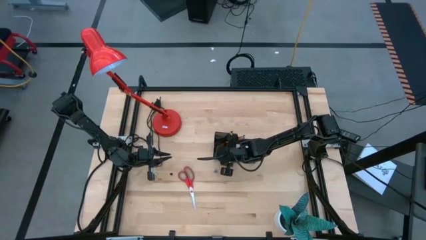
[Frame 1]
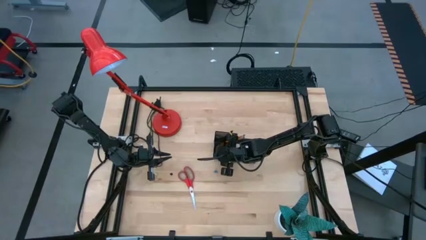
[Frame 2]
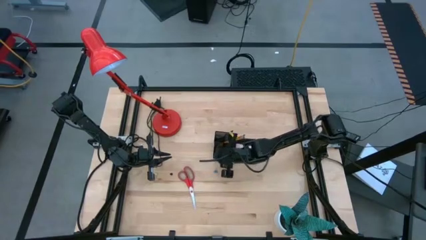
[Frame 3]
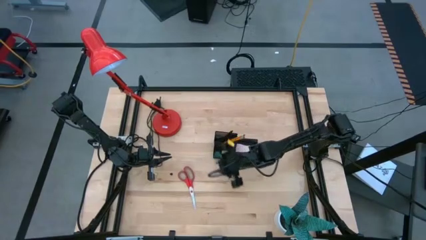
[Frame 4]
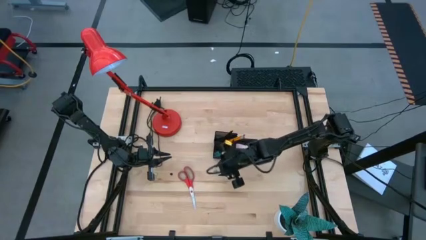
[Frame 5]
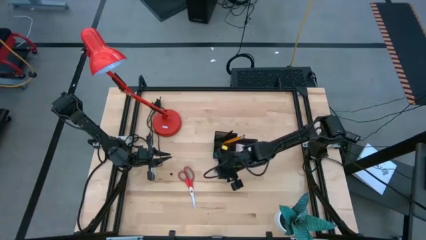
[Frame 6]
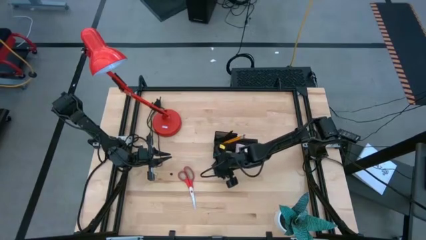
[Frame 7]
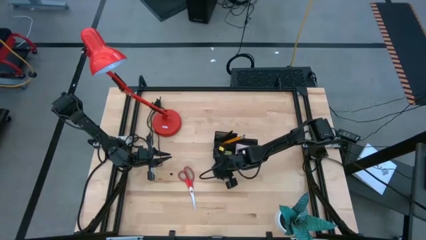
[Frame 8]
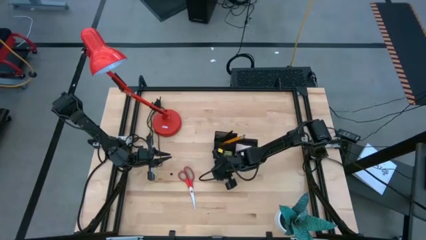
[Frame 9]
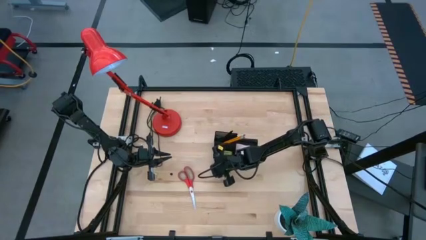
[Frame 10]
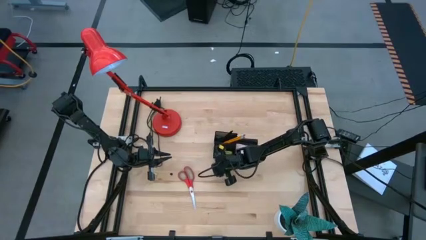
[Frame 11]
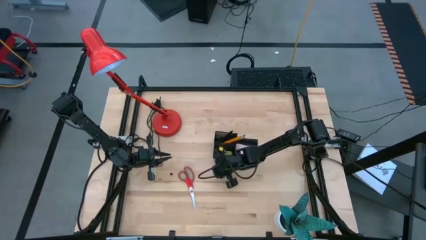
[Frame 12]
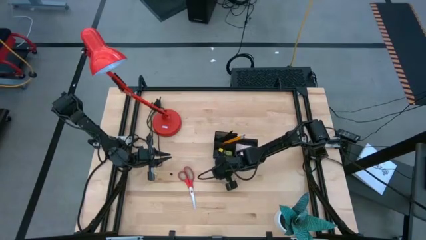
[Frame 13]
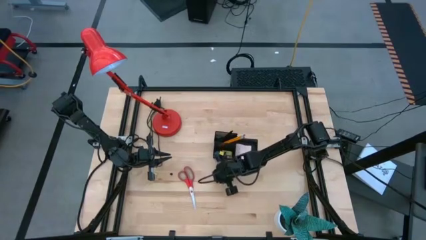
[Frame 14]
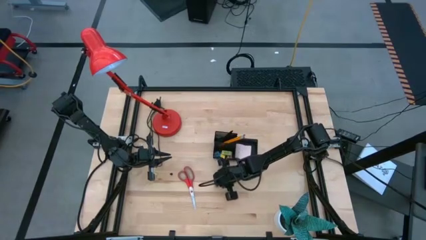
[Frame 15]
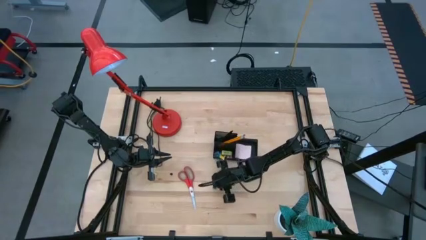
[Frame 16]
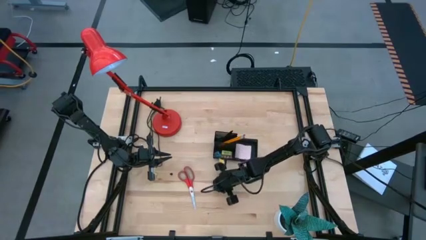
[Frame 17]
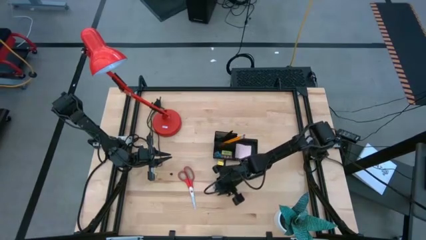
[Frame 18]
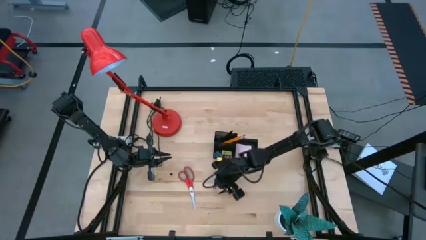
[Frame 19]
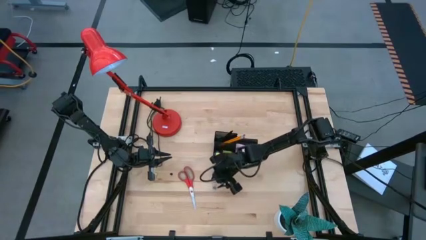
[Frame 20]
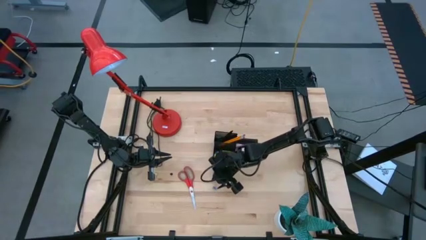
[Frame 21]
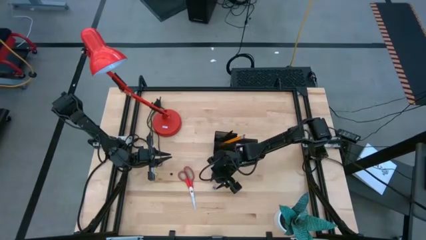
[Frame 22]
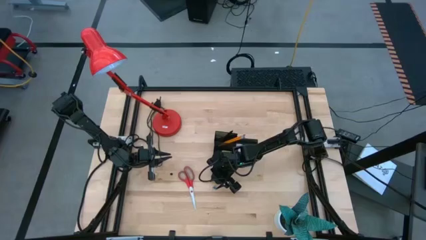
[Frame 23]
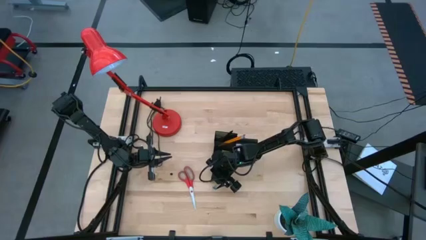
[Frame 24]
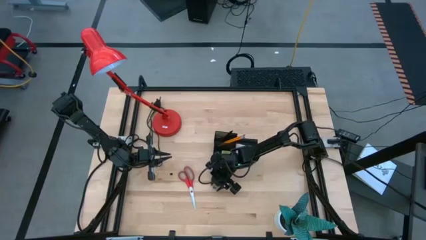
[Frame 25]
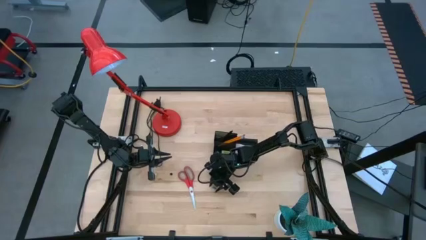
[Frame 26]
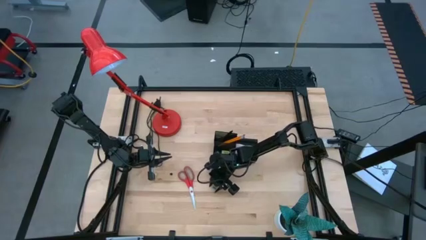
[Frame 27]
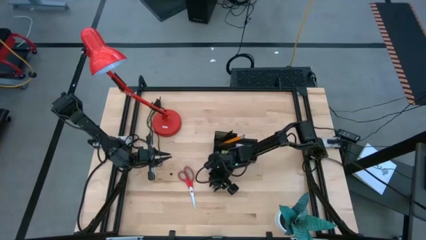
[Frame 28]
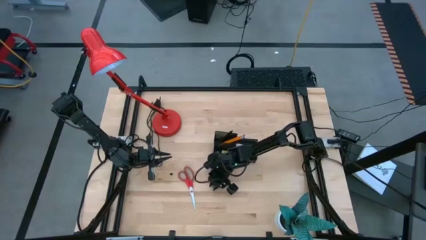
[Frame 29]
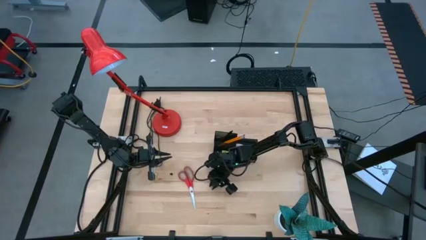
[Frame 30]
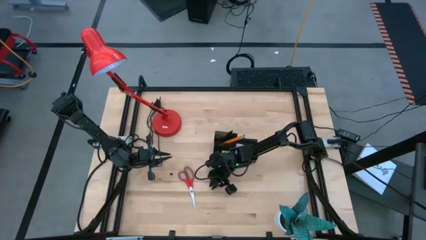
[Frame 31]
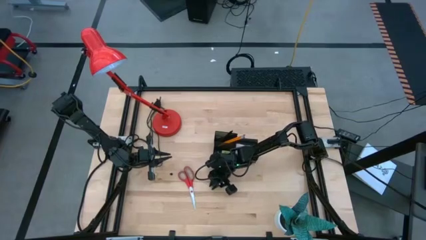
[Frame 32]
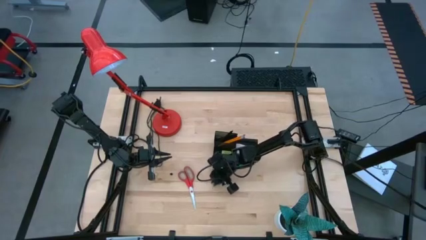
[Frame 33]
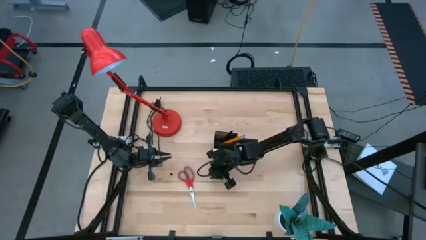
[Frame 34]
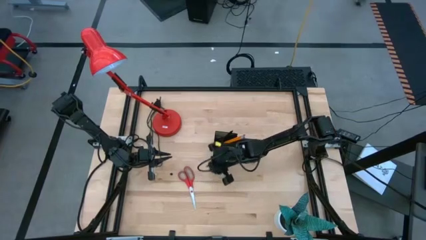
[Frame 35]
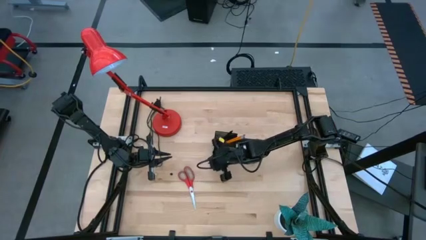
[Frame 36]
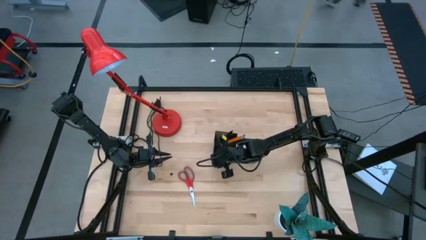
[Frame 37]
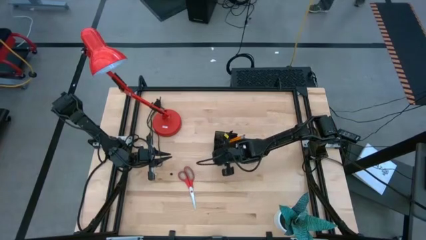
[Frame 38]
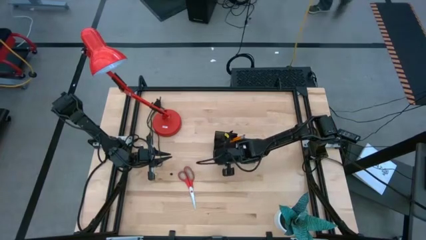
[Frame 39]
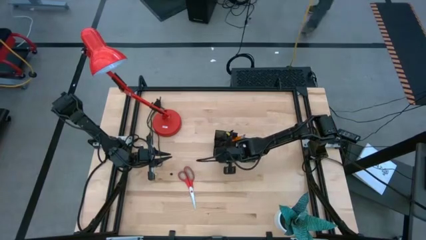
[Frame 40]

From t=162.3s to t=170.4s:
Task: Pick and place office supplies into organizer
Put the blue binder clip into the black desk organizer

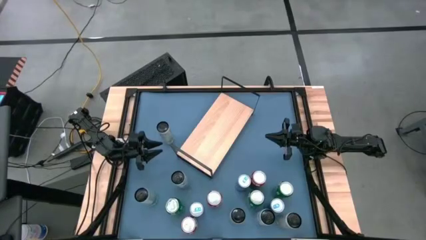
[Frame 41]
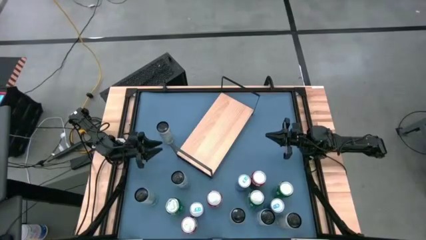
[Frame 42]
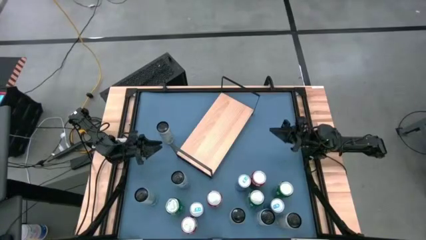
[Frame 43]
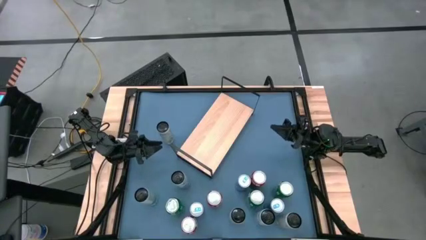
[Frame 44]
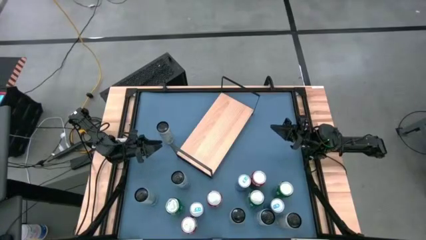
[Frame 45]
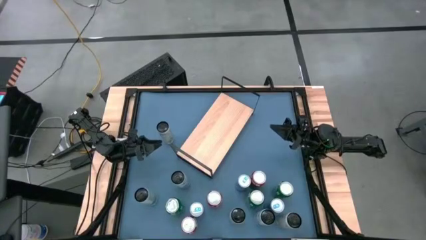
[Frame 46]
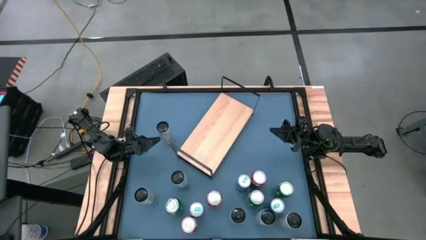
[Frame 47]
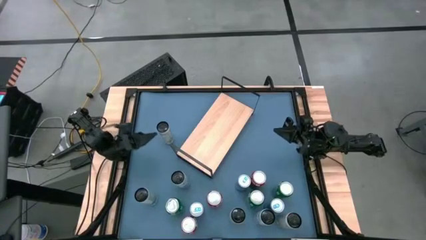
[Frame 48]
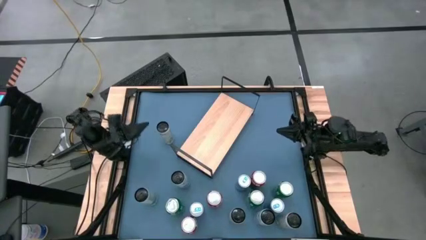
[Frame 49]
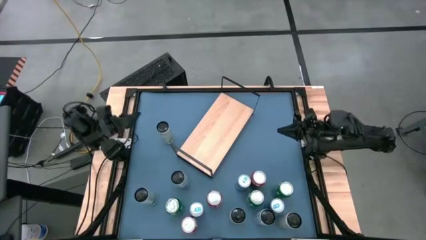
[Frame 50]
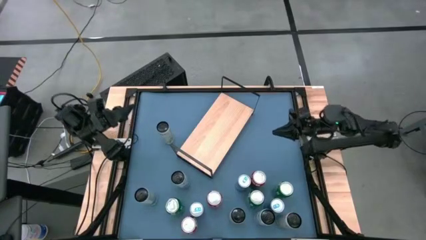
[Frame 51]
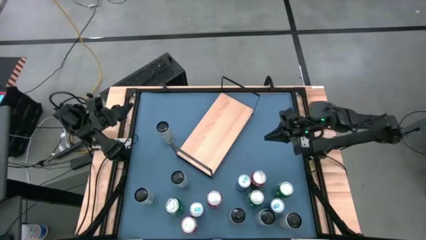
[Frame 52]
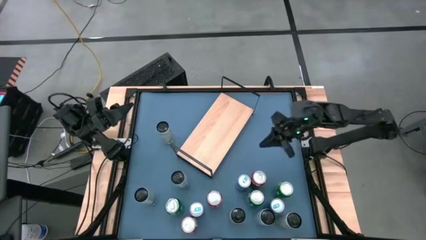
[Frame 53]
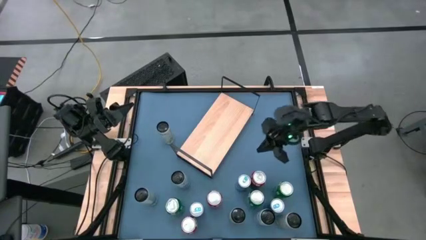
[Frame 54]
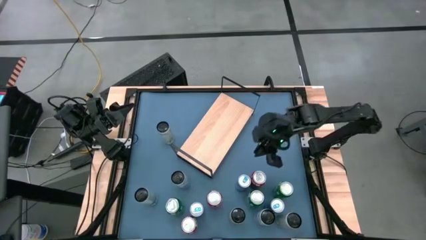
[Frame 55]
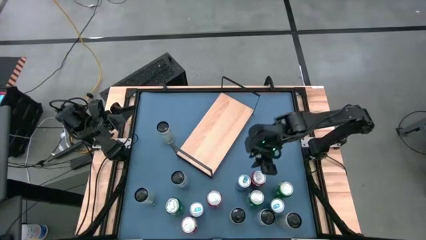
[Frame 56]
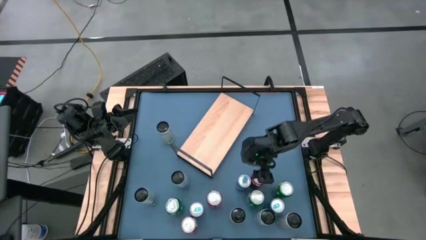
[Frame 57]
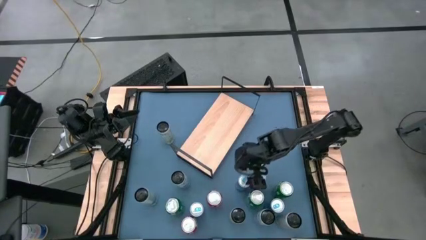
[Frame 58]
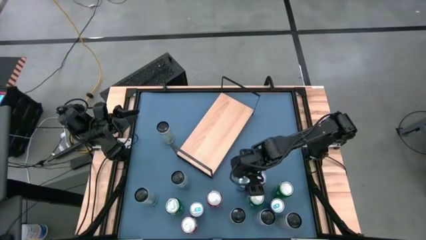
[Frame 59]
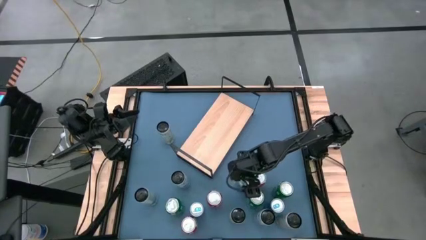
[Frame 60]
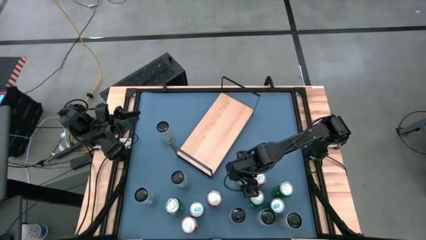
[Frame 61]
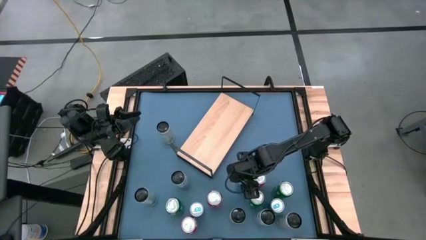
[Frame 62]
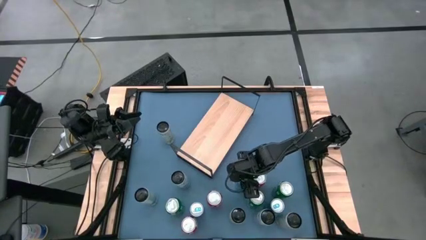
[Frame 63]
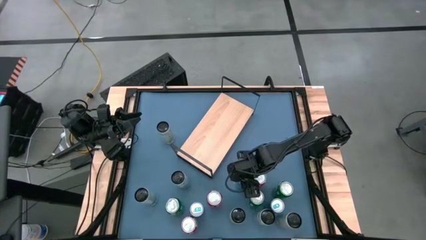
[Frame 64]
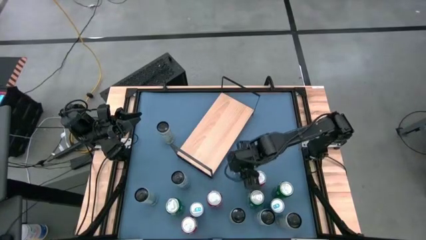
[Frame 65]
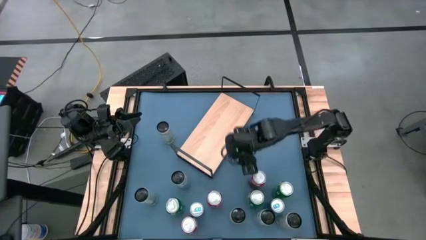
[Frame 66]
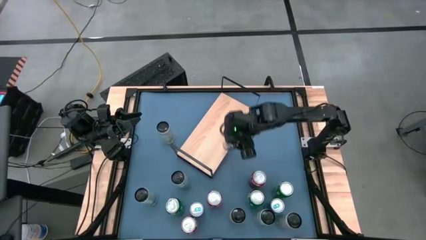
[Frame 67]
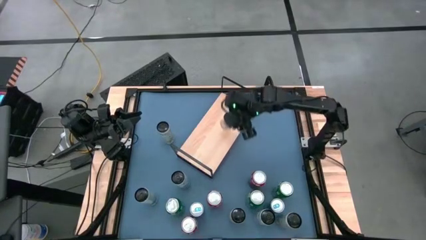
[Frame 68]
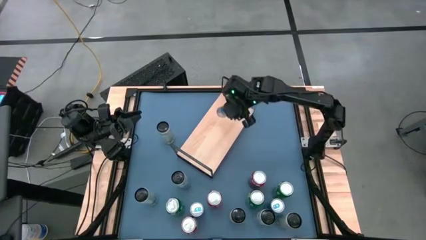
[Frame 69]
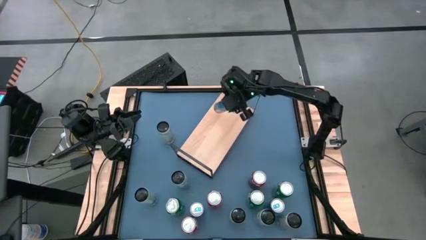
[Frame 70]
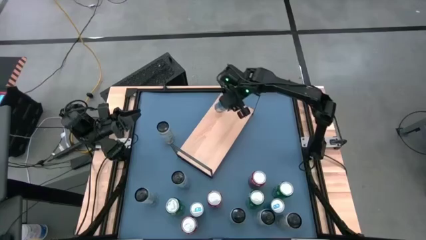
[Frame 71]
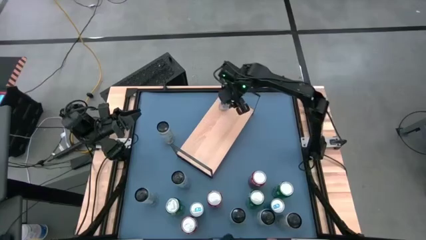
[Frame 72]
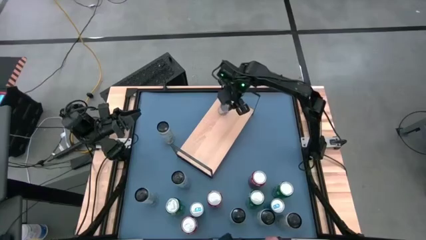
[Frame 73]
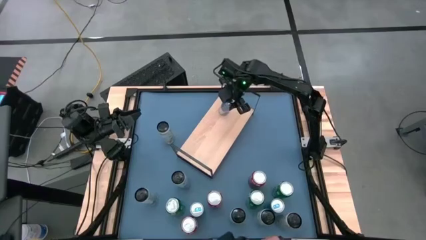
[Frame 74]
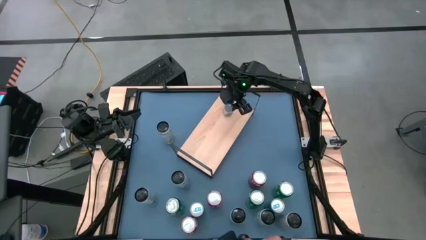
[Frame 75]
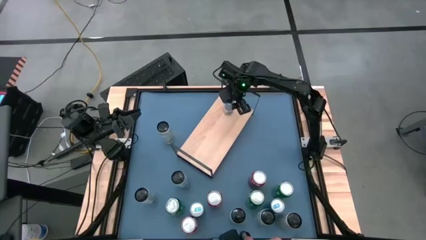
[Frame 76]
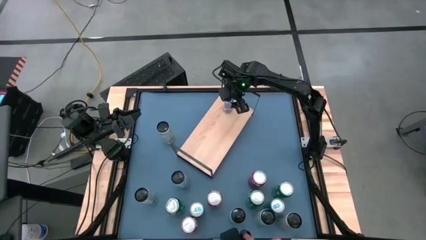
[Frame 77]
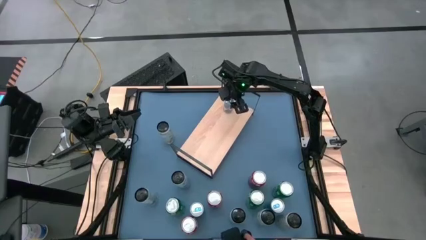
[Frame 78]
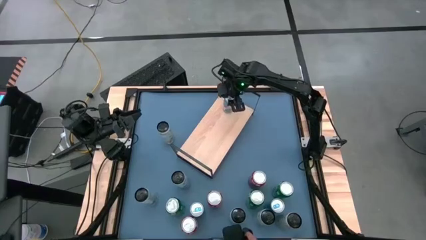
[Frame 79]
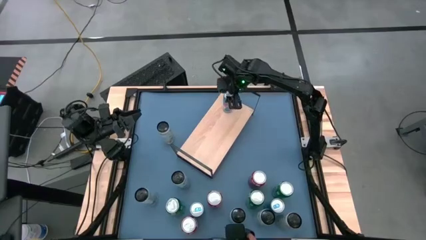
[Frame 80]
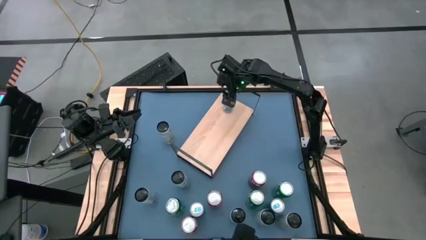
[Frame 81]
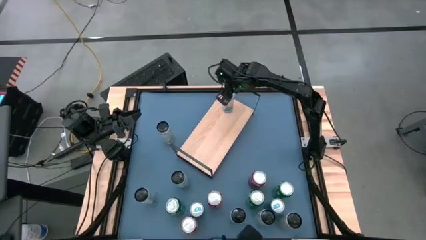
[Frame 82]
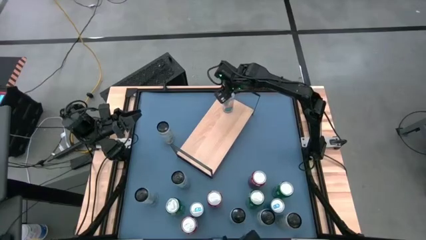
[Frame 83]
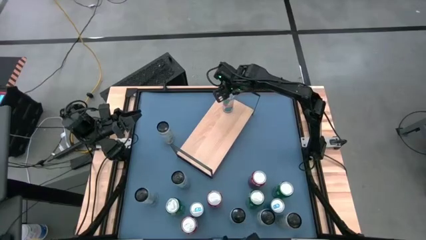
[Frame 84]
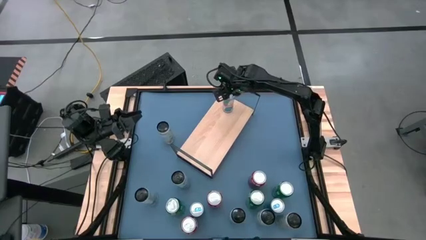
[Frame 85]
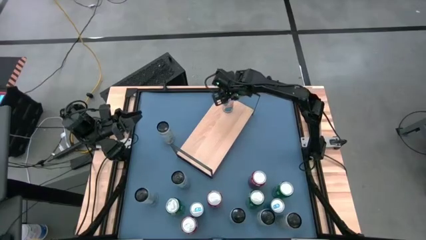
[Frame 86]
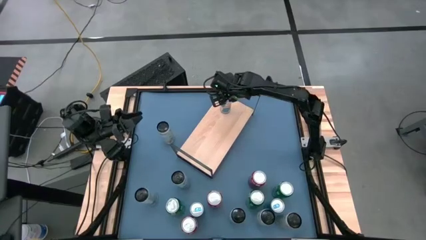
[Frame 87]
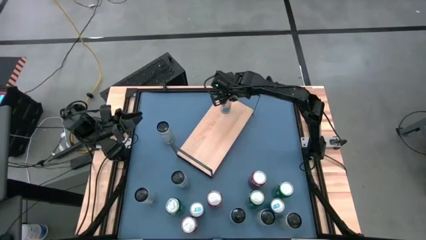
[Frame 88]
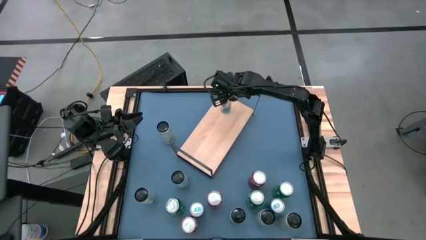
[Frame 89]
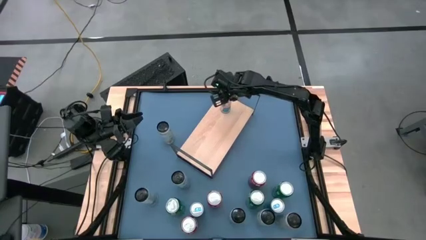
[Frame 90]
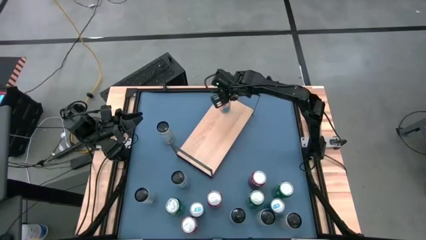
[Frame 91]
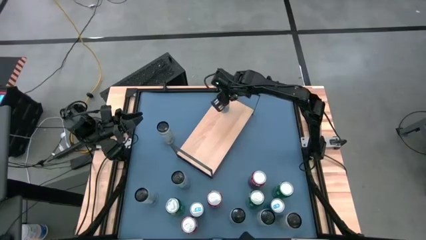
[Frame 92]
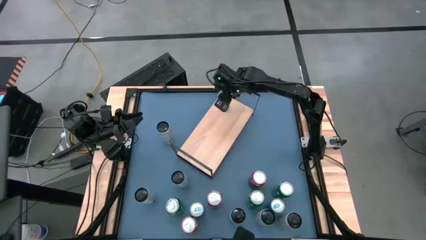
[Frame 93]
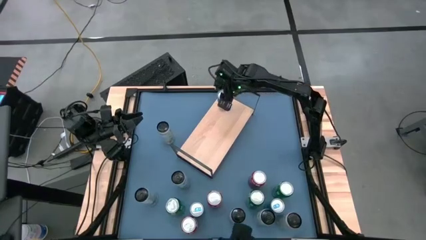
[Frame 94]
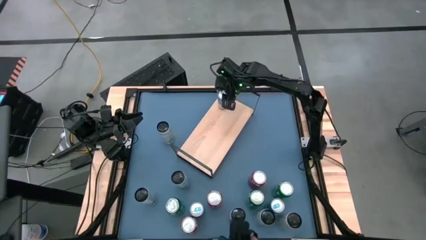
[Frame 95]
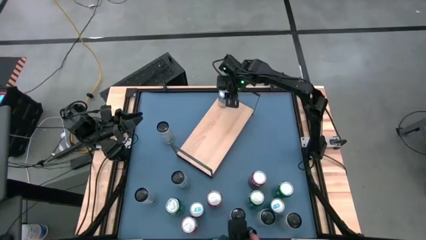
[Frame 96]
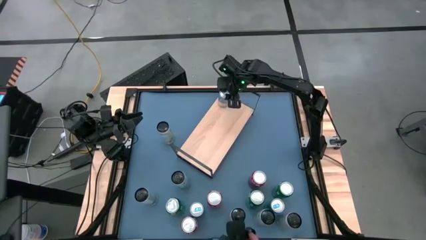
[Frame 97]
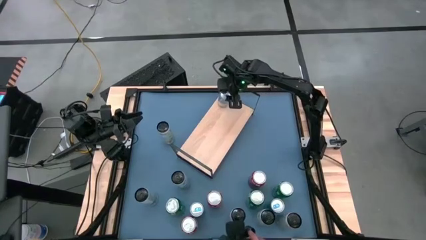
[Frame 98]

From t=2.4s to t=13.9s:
Task: Place canned beverage on shelf
Put the middle blue soda can on the shelf
